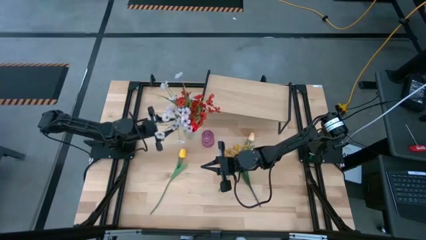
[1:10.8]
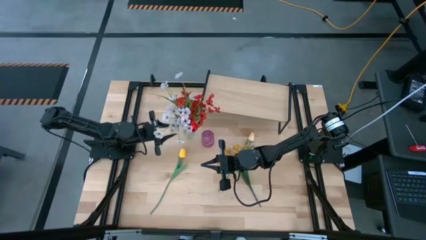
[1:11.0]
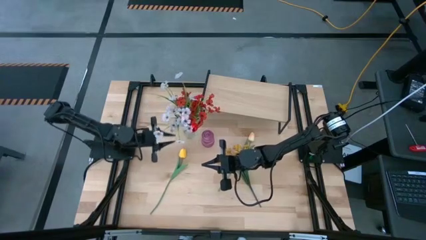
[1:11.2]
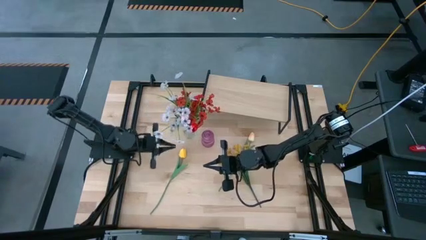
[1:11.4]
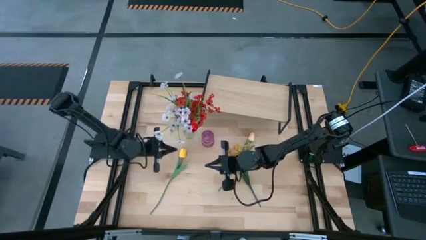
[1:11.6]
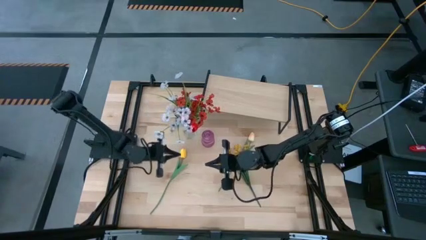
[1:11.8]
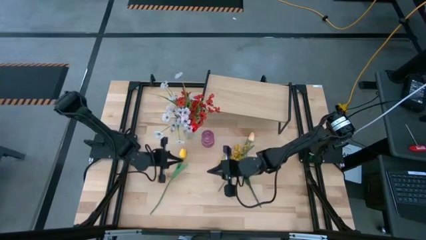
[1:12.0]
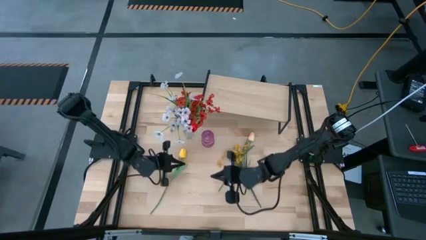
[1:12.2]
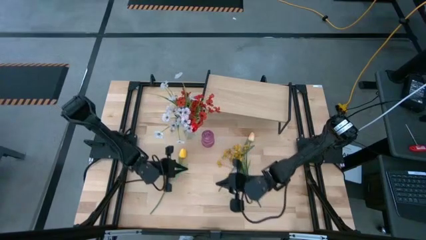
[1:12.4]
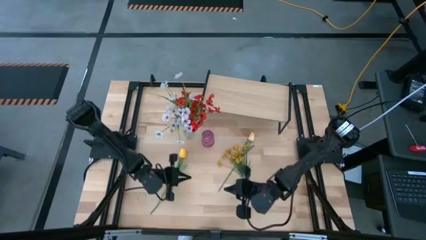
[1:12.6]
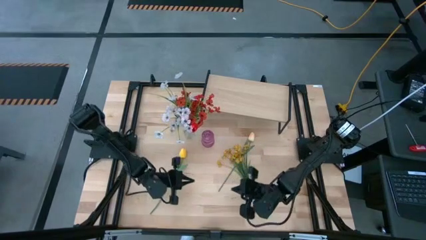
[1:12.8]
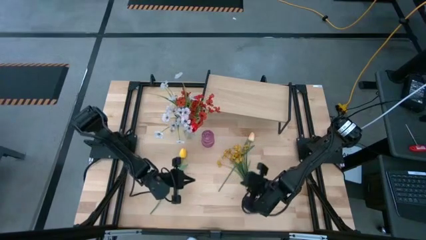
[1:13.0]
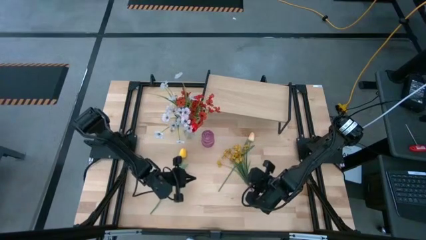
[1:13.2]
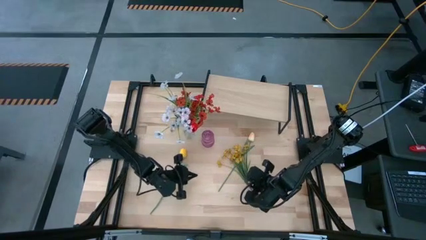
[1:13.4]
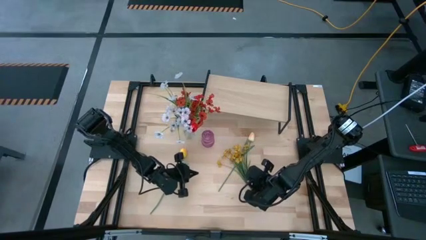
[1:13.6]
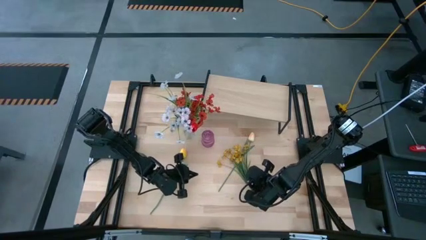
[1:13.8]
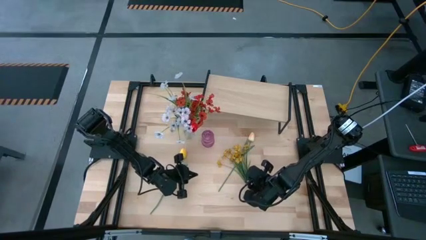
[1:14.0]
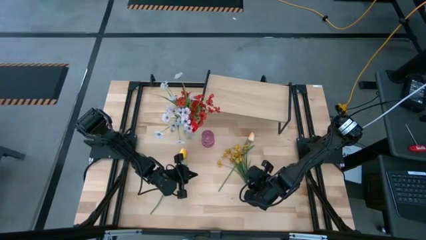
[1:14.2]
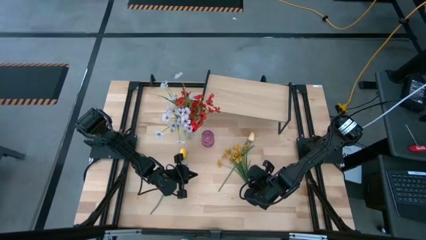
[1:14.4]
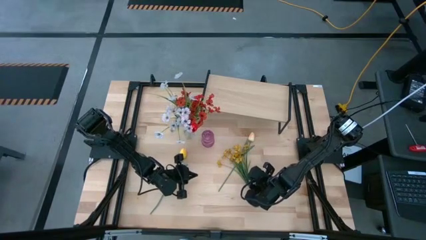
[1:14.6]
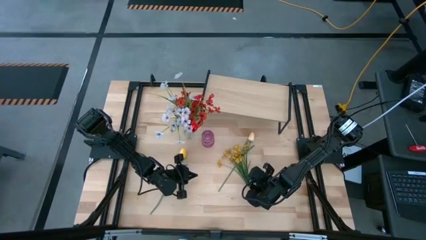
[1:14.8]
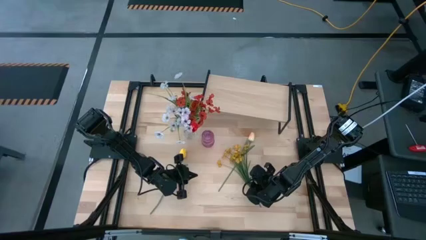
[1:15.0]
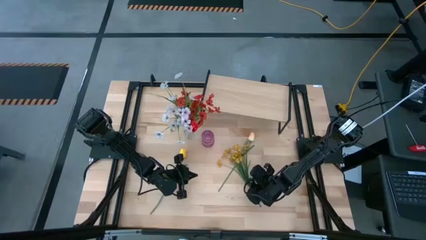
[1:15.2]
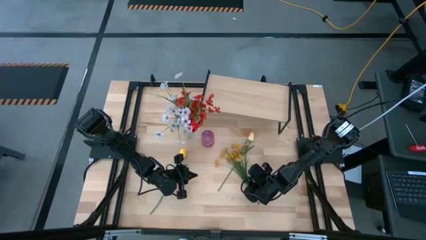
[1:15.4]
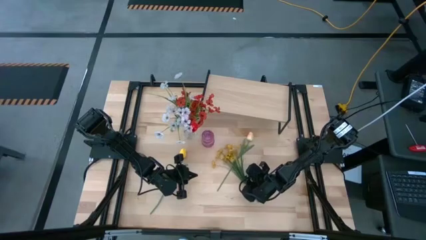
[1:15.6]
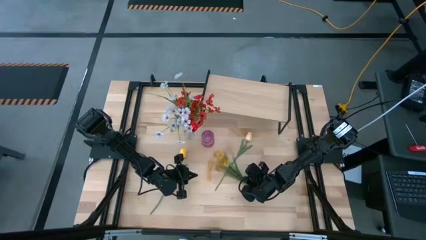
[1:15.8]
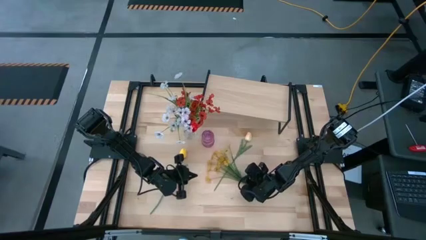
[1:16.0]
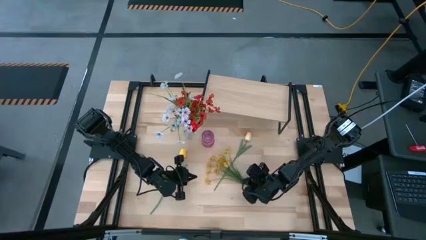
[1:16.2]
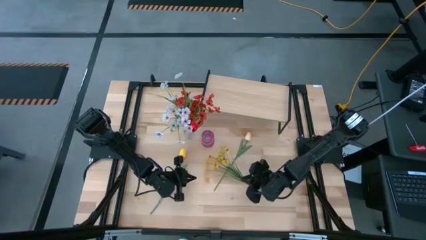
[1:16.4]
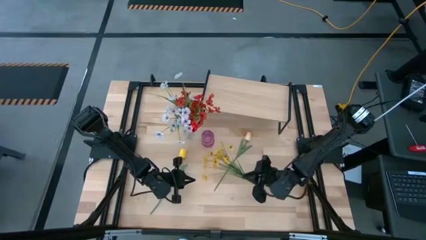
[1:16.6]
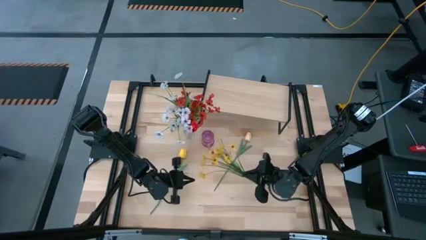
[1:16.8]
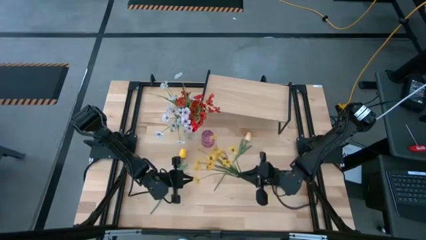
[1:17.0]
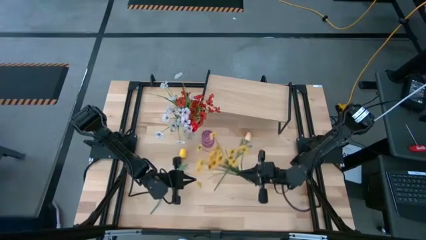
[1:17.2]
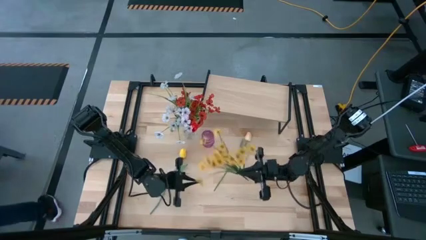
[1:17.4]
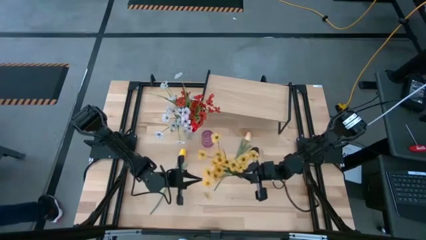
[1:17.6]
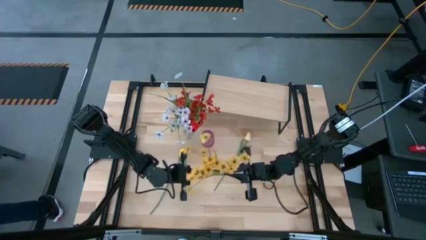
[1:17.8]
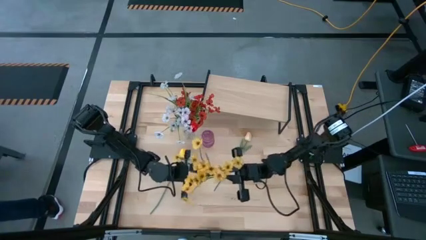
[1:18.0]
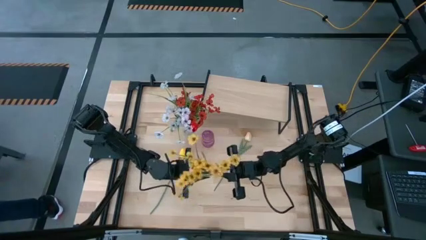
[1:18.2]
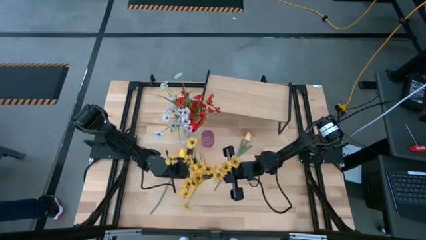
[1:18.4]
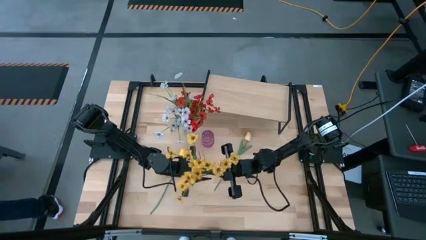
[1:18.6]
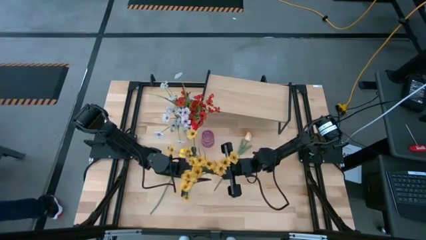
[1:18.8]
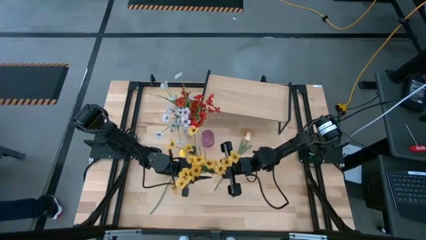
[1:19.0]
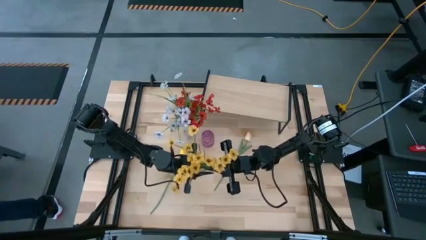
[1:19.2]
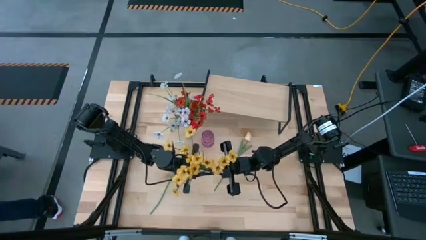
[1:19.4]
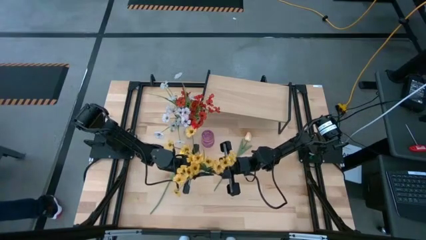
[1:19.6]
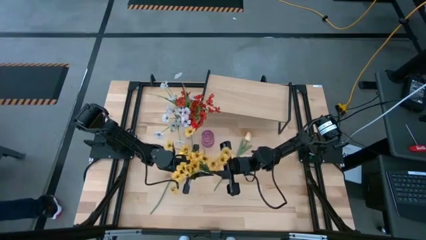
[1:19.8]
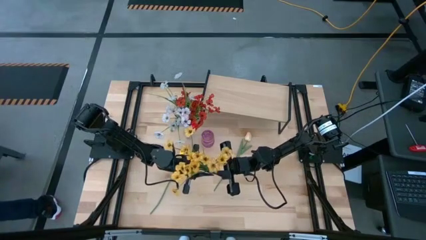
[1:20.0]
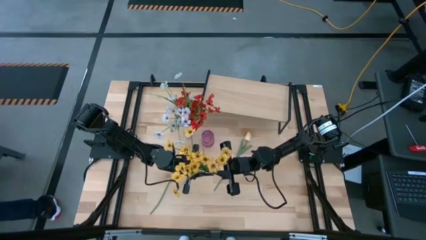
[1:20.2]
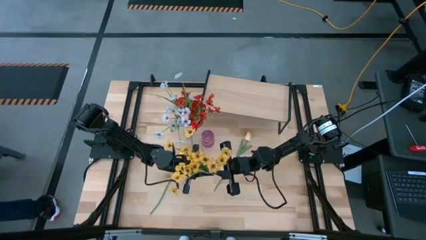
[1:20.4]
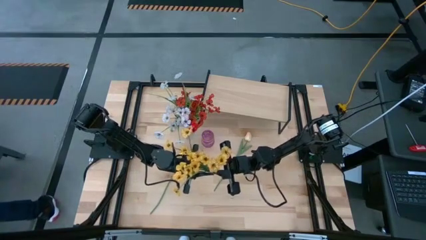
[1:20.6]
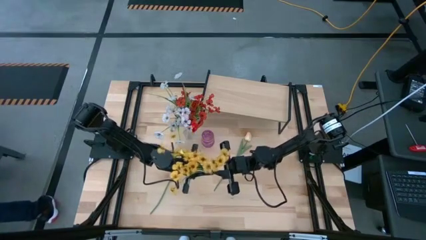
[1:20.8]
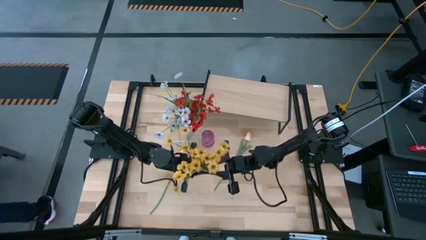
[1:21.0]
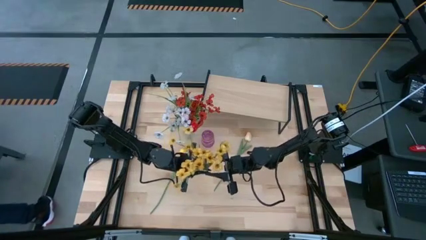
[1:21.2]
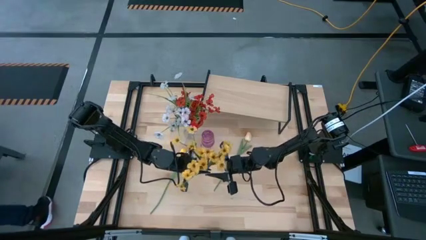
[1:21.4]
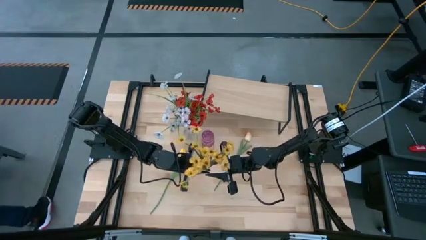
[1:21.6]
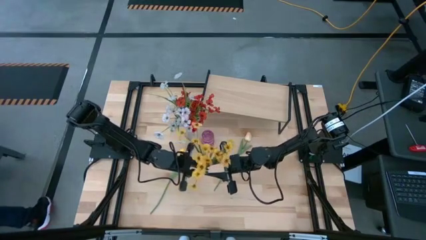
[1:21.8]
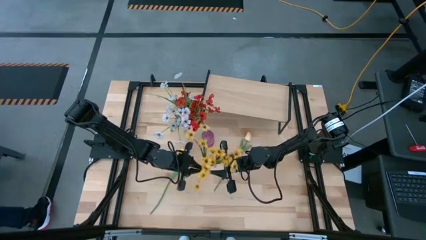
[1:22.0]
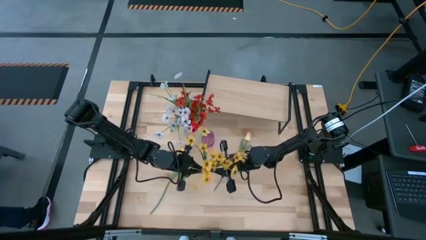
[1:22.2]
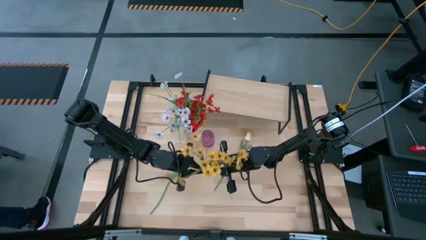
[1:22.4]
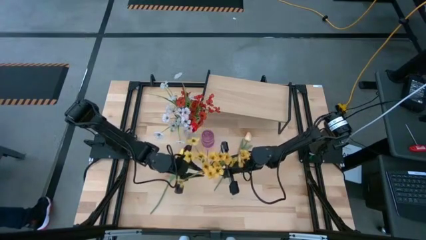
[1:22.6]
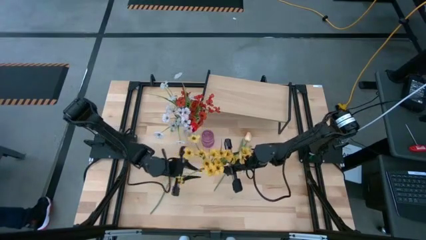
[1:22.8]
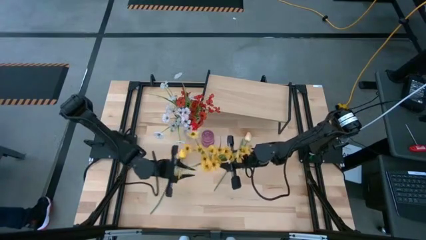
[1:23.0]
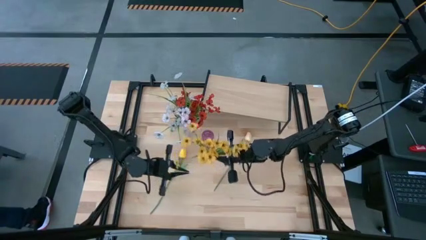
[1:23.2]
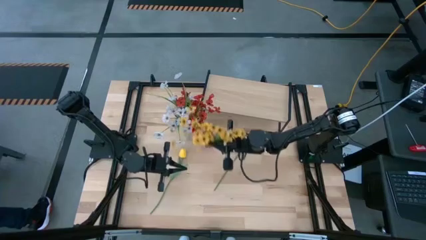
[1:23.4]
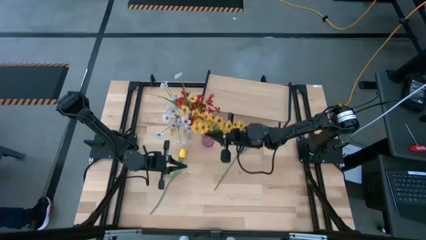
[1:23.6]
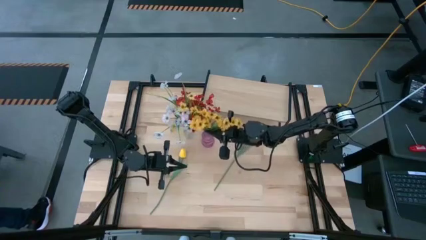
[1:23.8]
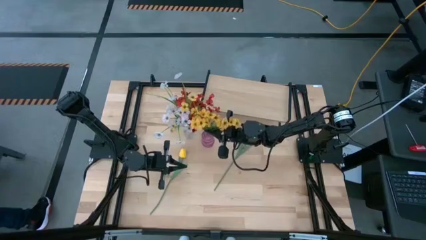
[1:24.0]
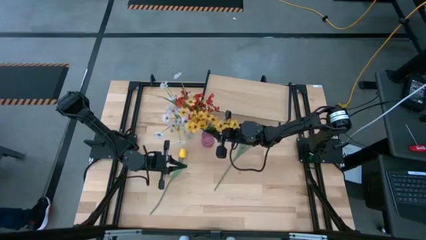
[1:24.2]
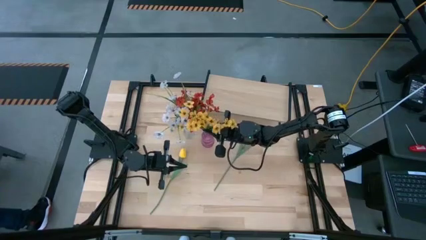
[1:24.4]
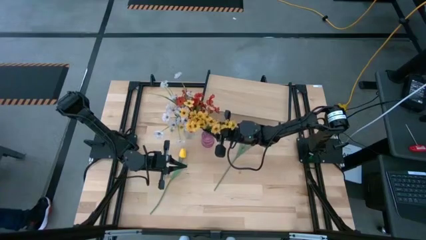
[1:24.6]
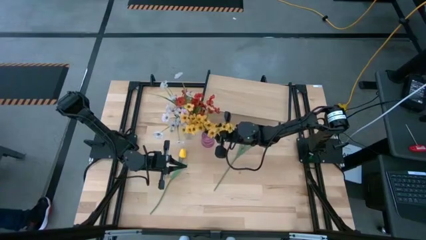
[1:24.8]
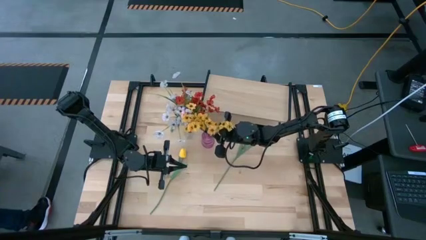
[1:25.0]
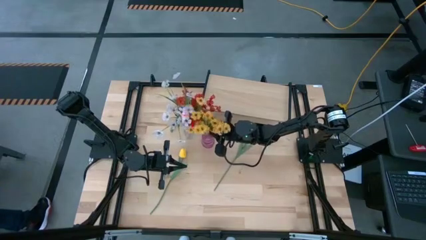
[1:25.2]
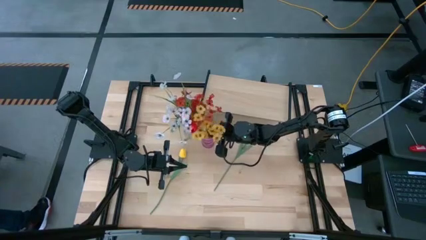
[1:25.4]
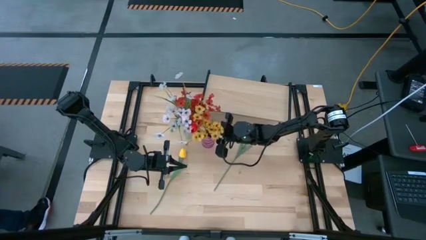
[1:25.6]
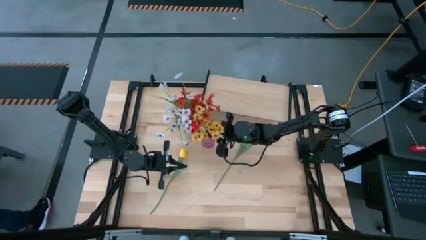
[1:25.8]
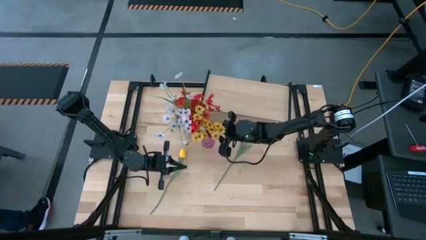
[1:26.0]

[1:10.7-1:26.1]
Task: Pick and place flowers into a vace then onto a shelf
Put the yellow flowers into the violet vase
